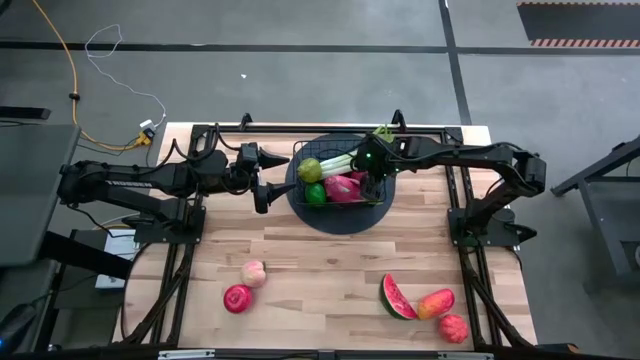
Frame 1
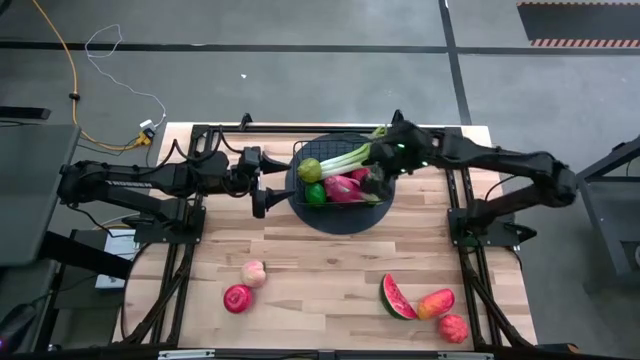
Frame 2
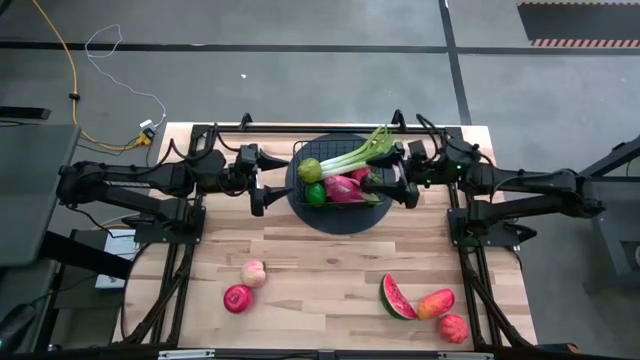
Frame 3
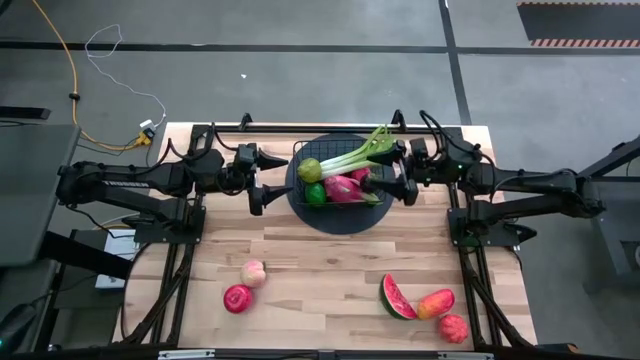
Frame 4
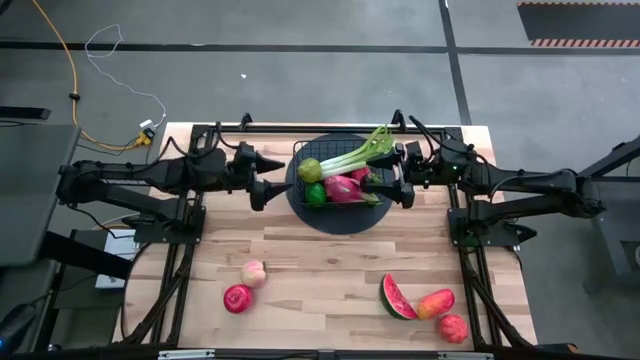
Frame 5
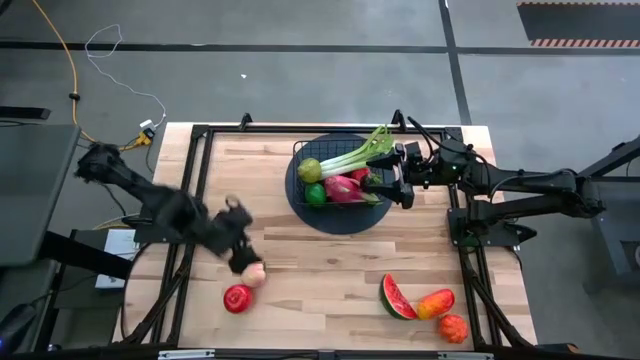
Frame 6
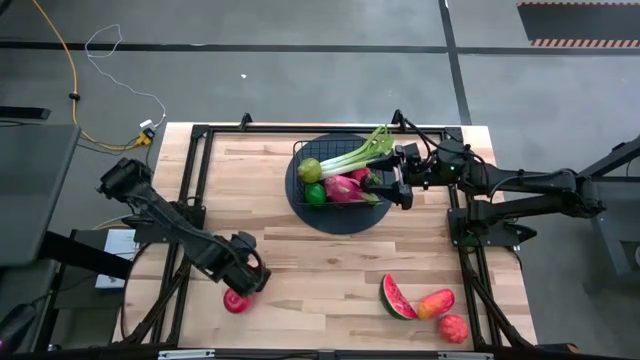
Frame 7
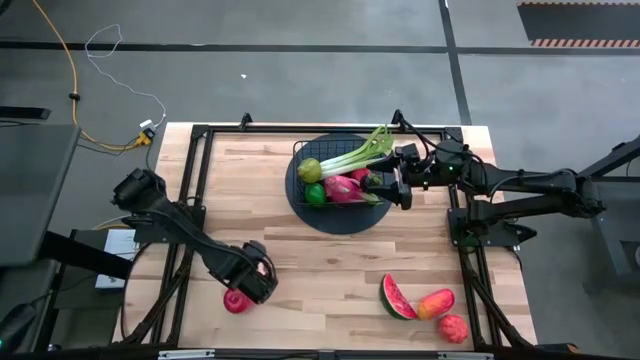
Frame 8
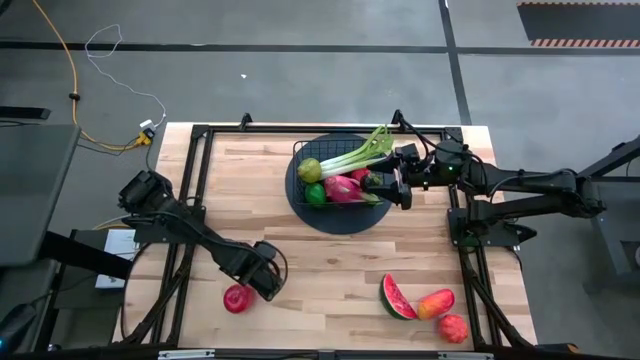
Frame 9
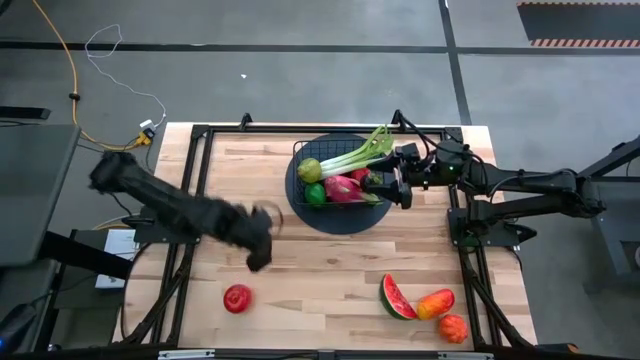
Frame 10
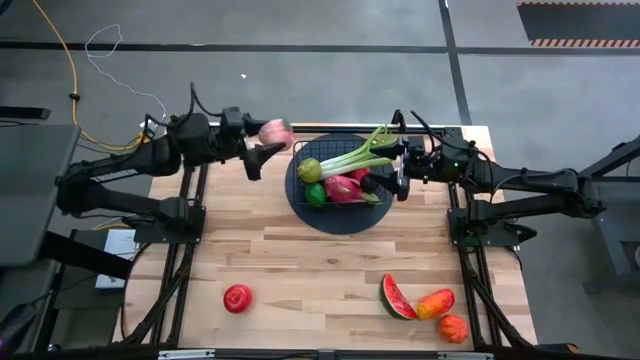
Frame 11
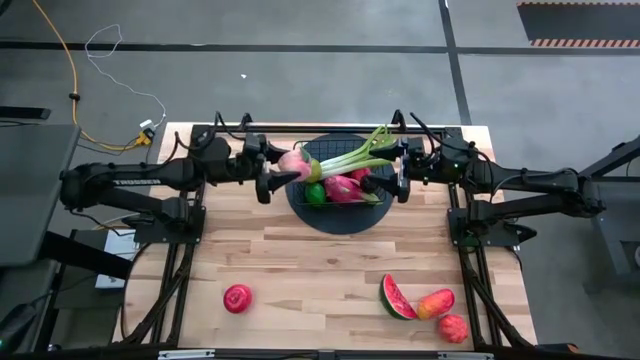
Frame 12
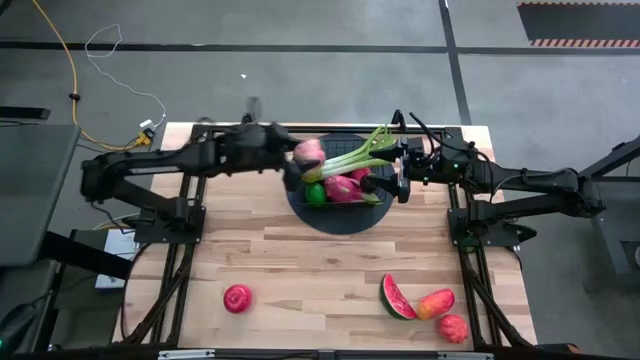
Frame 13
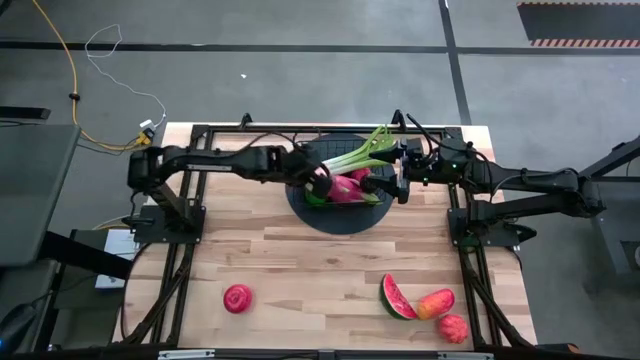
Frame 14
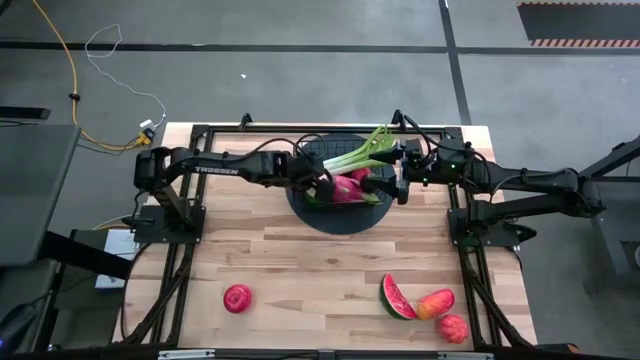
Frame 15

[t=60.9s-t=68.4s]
Task: Build produce basket
Put the peach into the wire basket

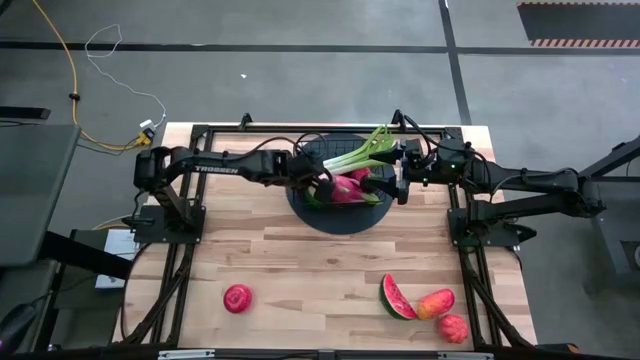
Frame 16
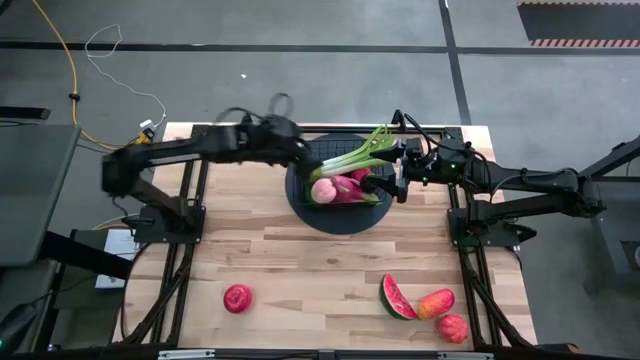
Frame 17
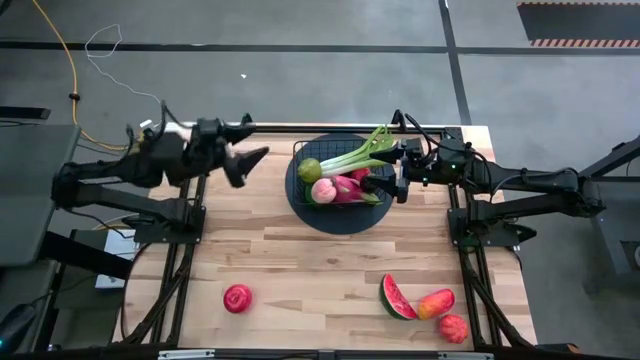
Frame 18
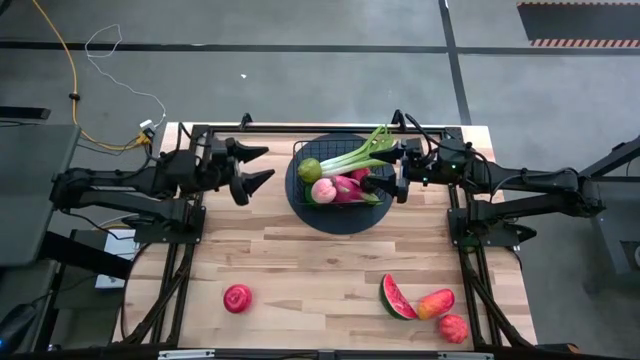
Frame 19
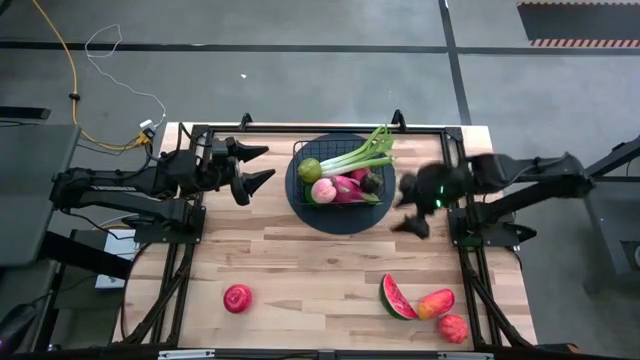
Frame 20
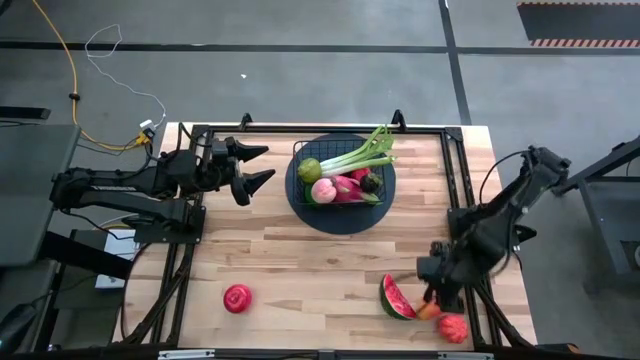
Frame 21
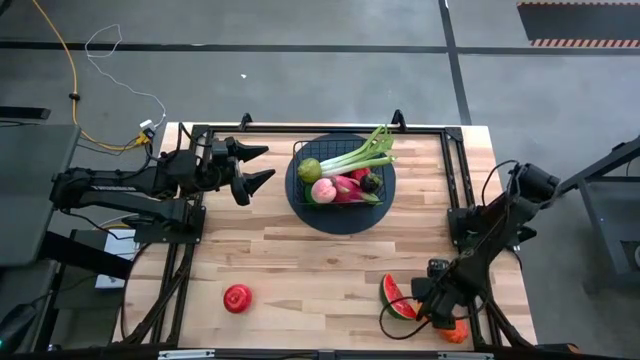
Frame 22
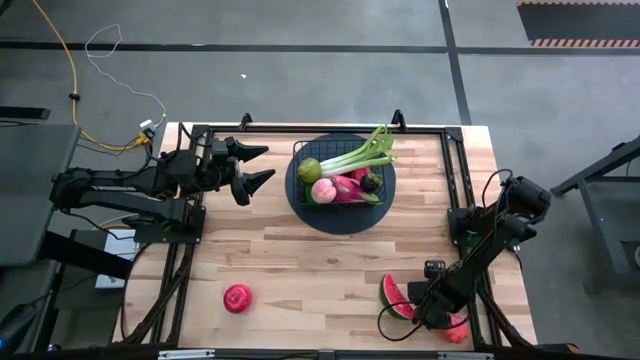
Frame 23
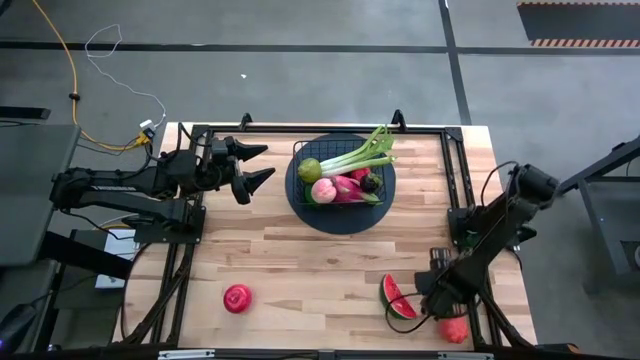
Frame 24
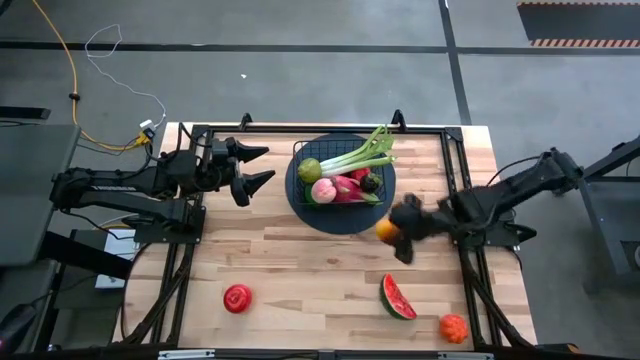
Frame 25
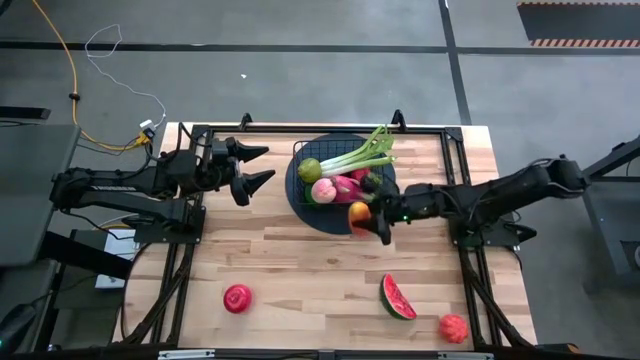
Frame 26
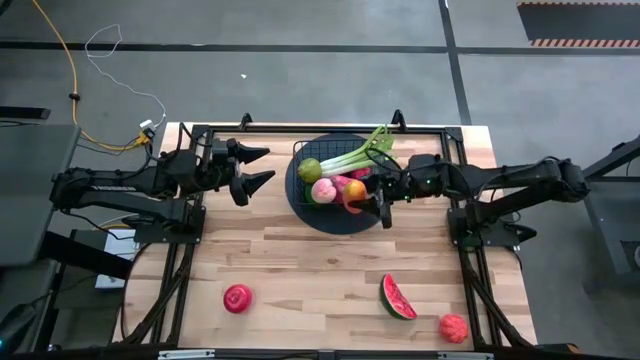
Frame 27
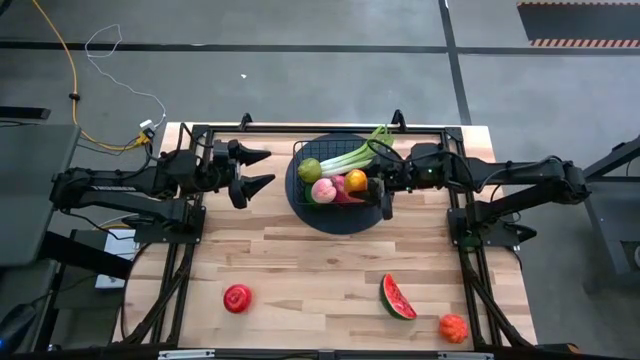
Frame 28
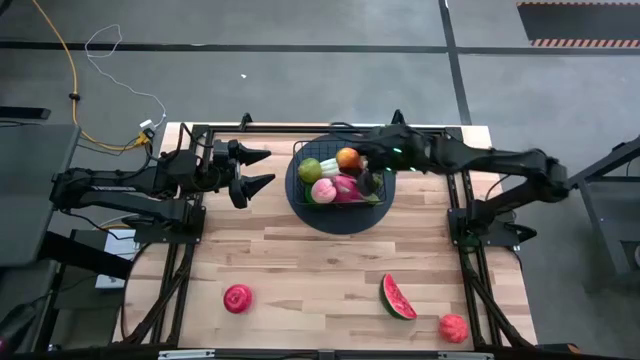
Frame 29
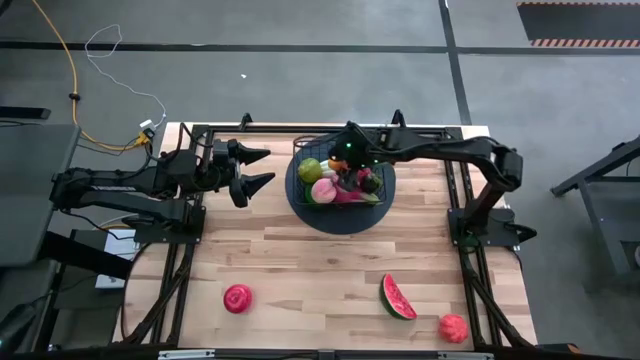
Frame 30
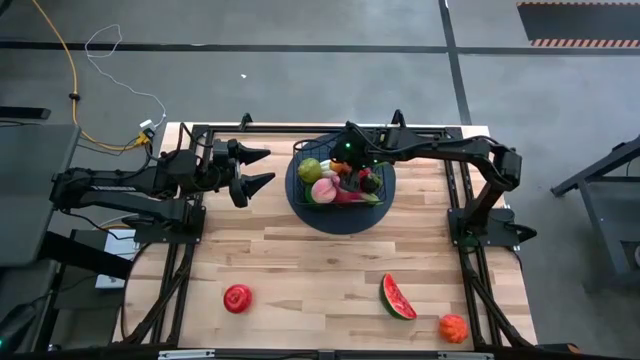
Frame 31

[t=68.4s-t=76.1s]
Put the mango into the wire basket

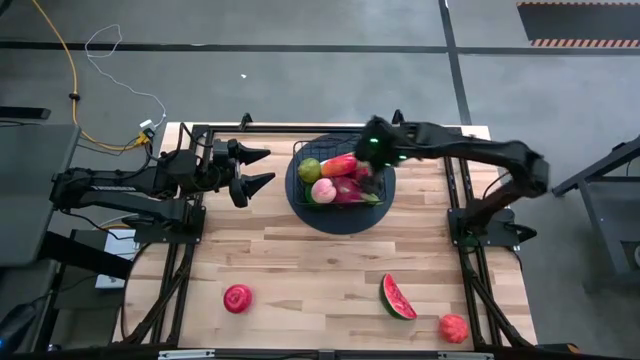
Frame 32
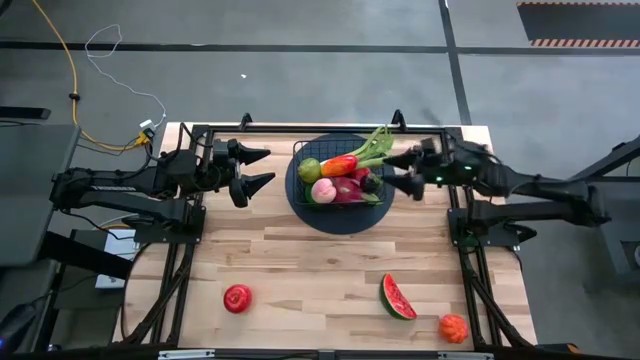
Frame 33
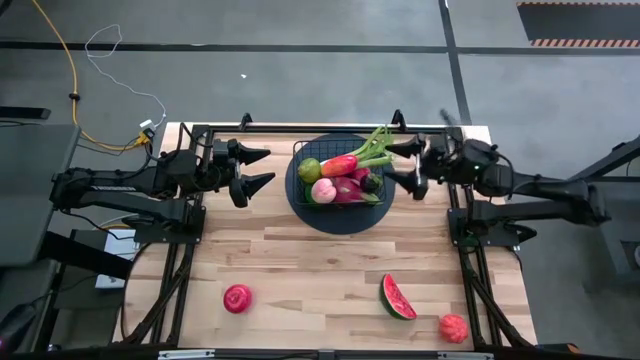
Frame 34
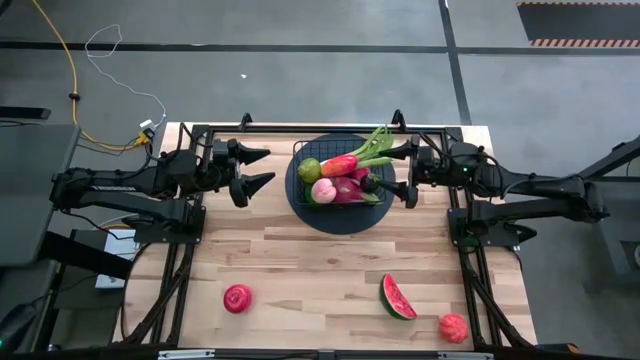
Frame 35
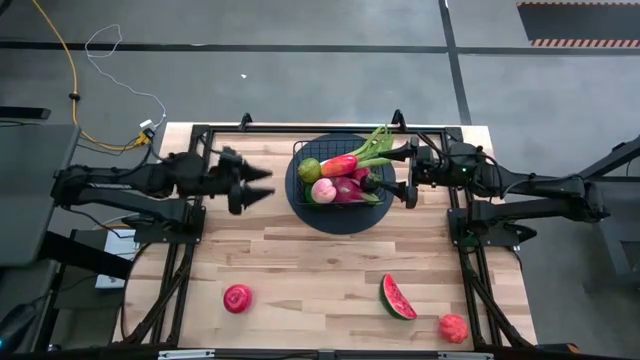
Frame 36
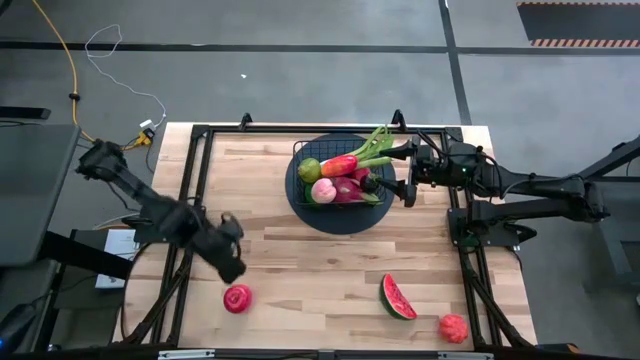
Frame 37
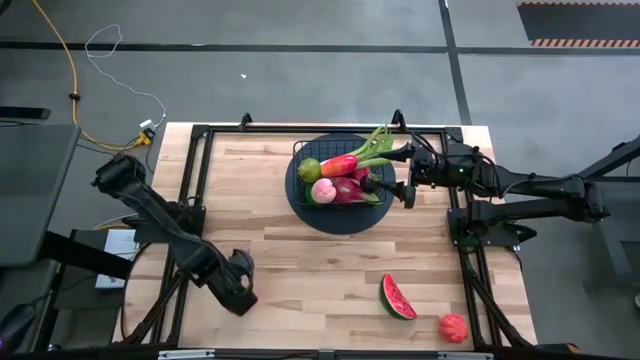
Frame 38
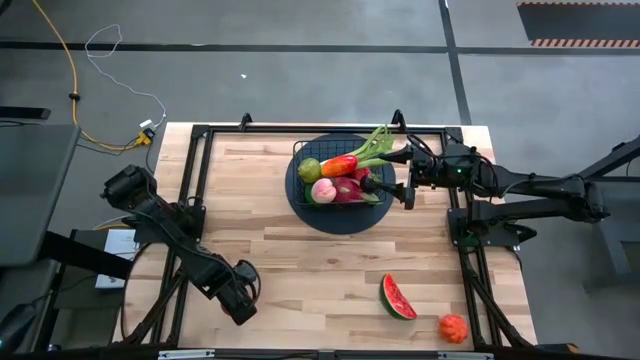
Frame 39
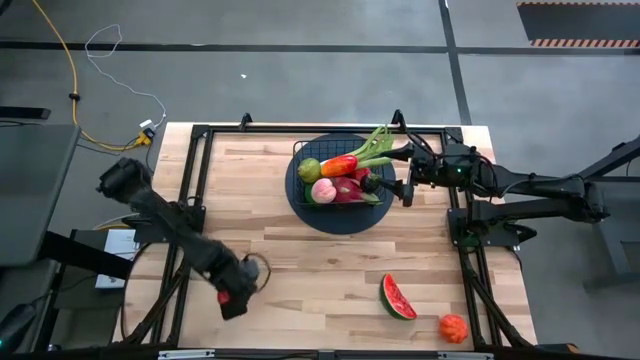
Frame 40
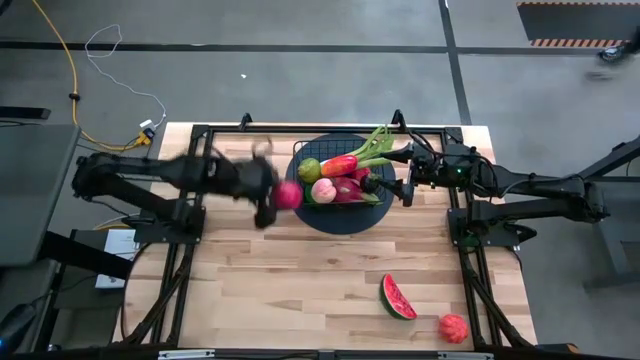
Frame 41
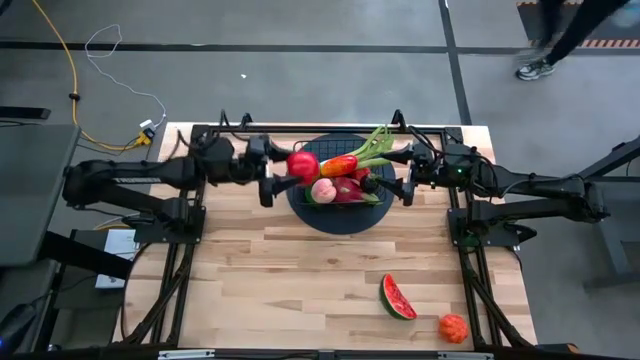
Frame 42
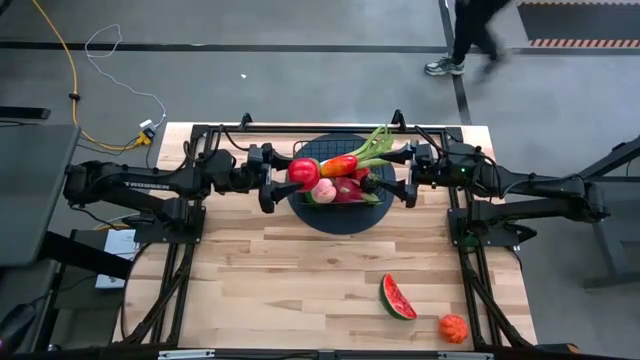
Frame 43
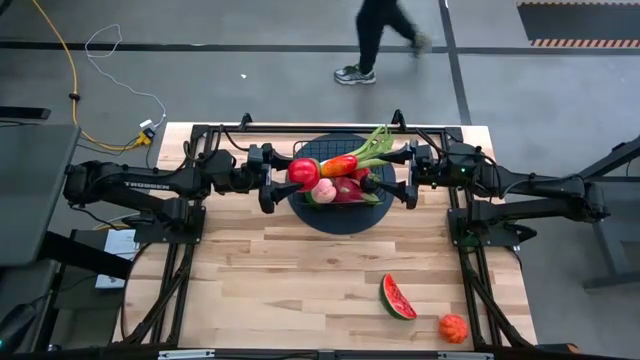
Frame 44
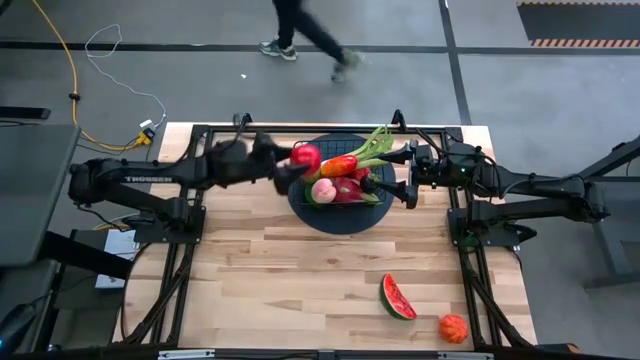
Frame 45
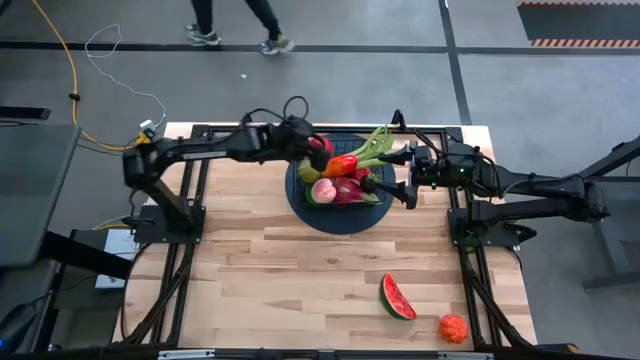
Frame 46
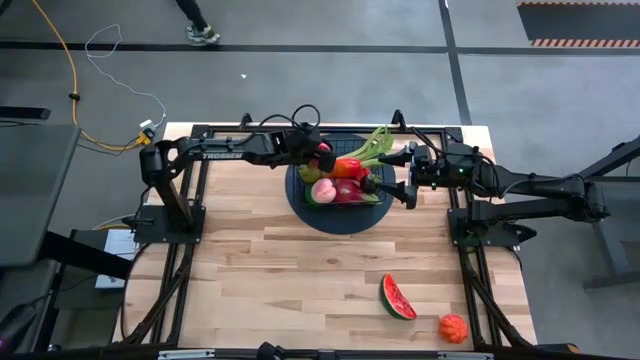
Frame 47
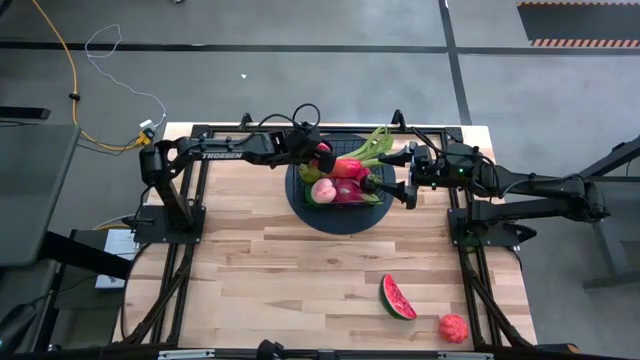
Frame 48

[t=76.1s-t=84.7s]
Put the apple into the wire basket
